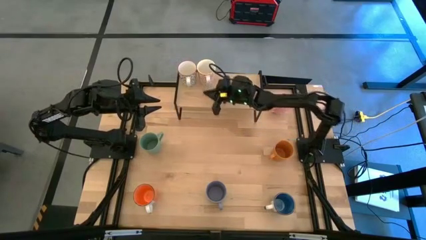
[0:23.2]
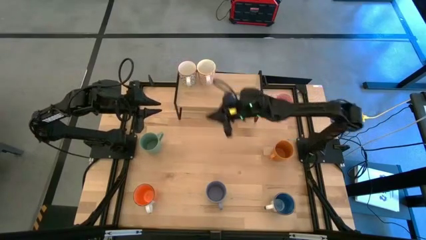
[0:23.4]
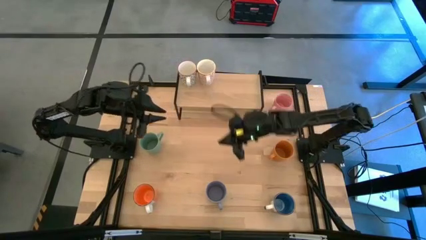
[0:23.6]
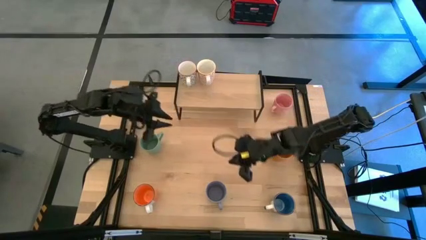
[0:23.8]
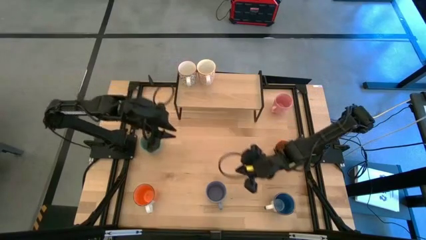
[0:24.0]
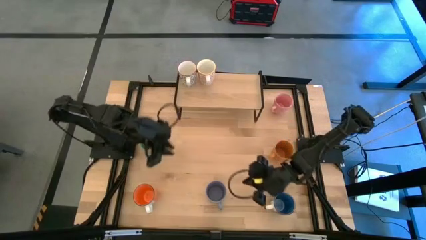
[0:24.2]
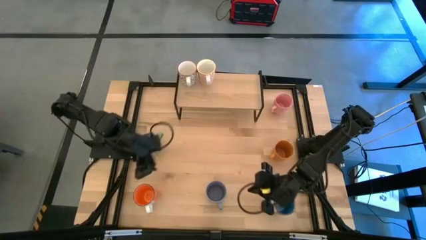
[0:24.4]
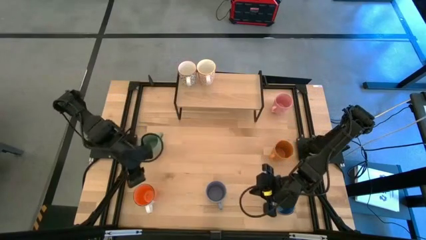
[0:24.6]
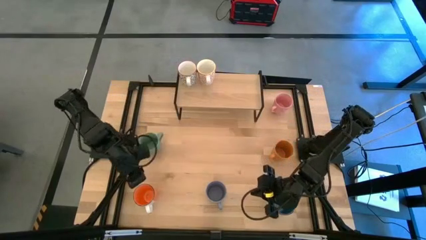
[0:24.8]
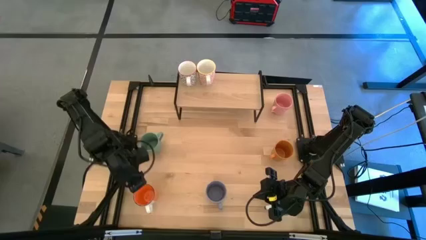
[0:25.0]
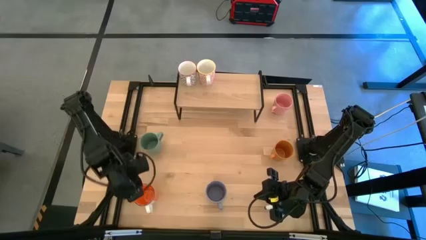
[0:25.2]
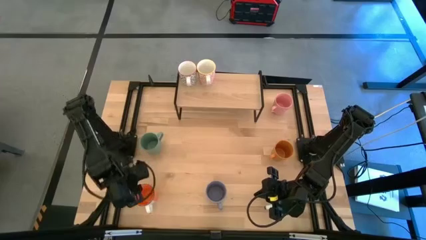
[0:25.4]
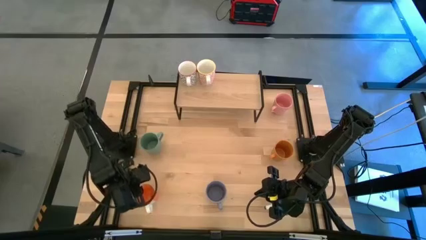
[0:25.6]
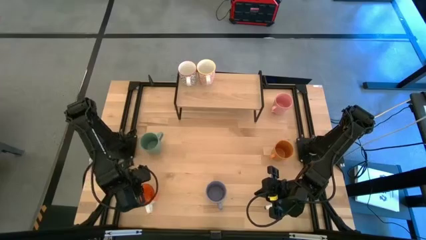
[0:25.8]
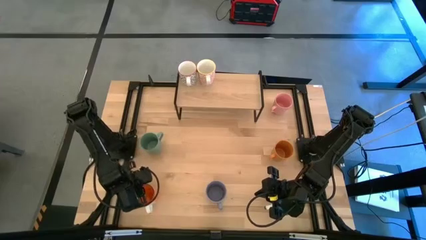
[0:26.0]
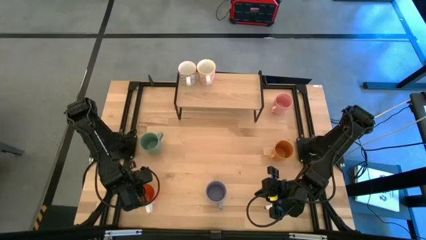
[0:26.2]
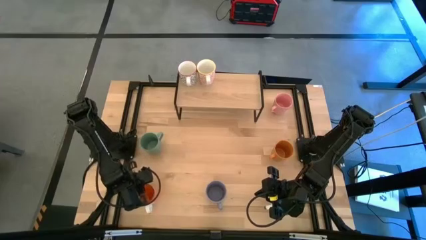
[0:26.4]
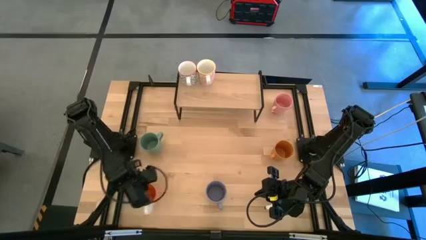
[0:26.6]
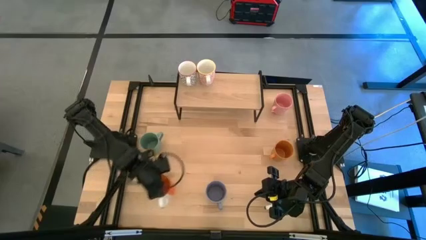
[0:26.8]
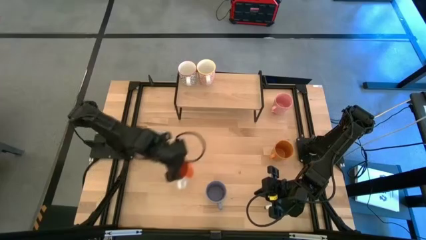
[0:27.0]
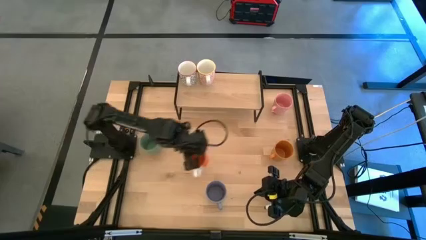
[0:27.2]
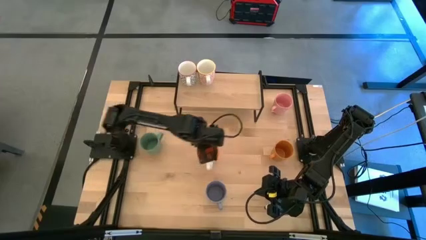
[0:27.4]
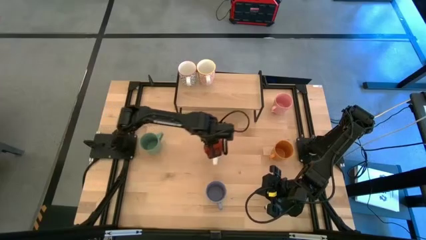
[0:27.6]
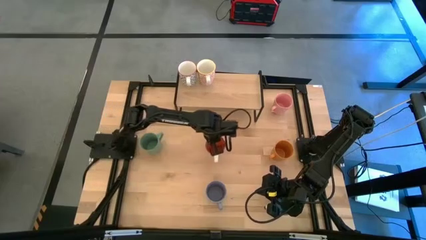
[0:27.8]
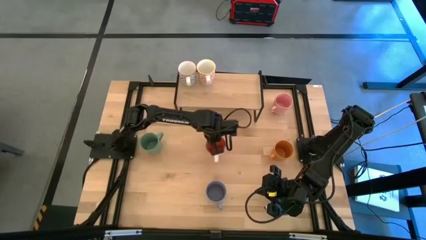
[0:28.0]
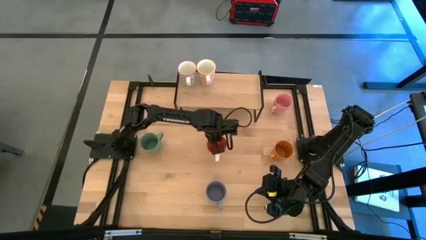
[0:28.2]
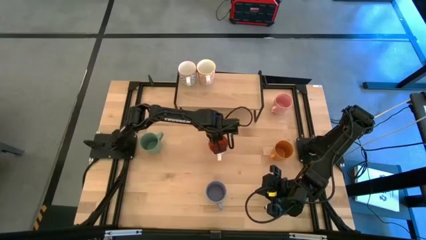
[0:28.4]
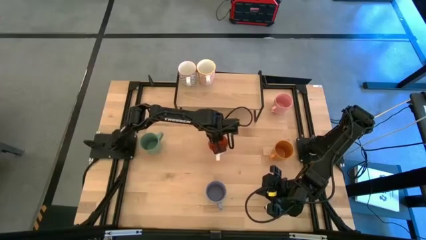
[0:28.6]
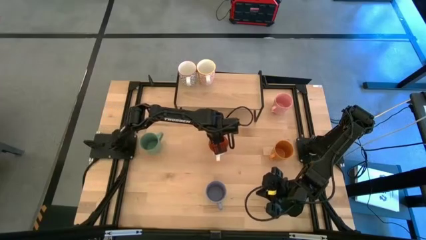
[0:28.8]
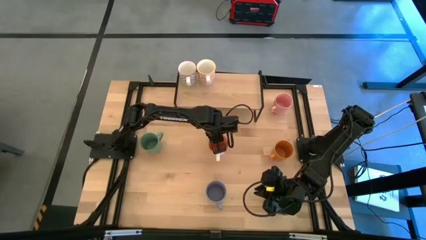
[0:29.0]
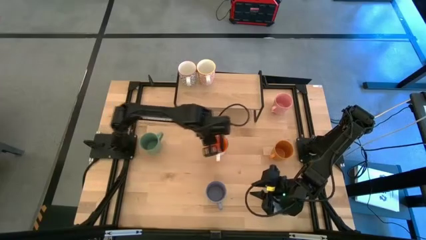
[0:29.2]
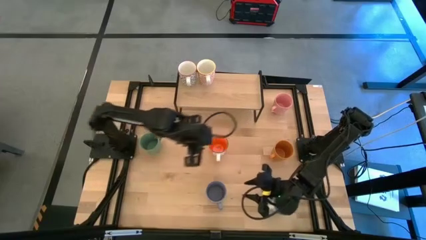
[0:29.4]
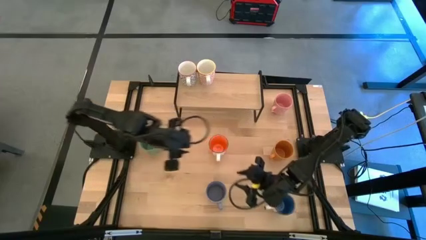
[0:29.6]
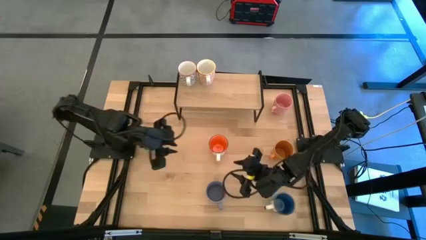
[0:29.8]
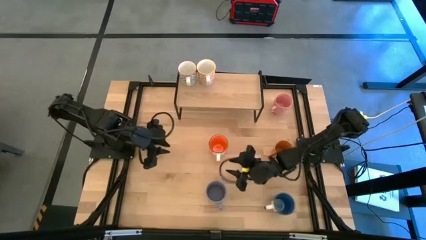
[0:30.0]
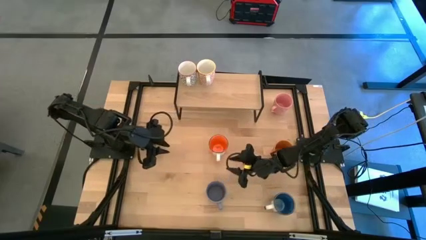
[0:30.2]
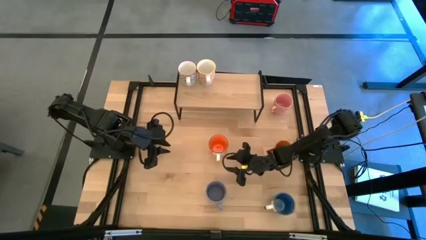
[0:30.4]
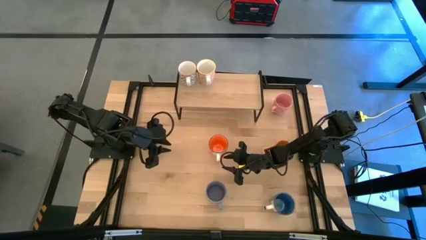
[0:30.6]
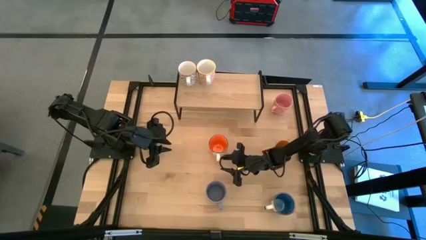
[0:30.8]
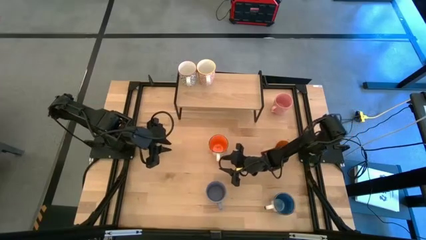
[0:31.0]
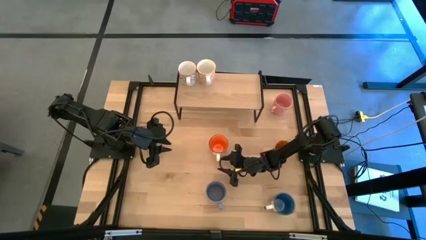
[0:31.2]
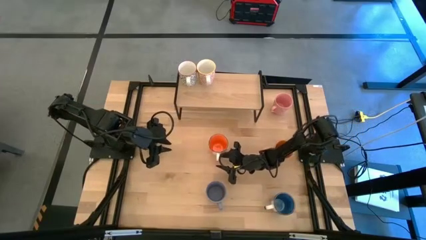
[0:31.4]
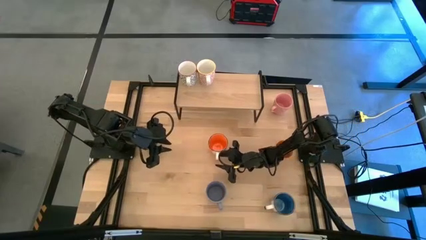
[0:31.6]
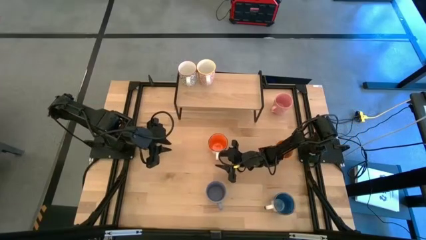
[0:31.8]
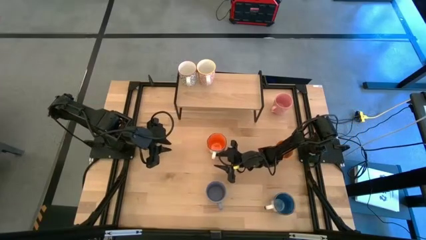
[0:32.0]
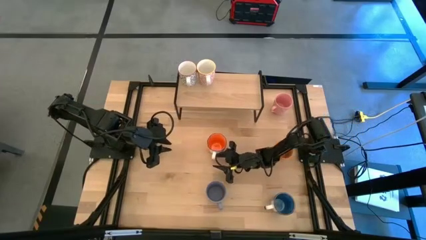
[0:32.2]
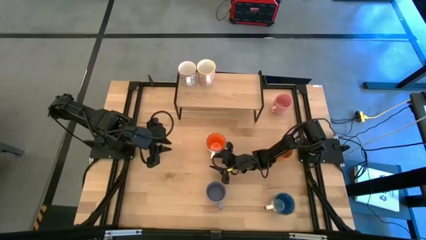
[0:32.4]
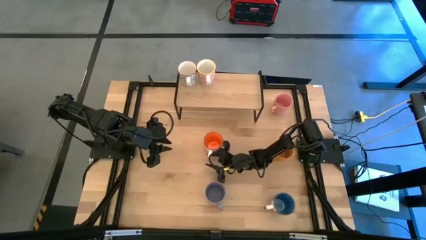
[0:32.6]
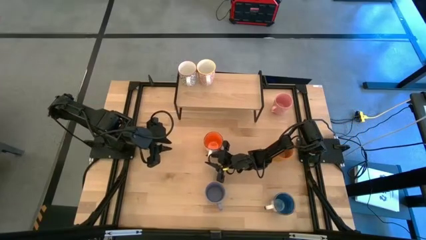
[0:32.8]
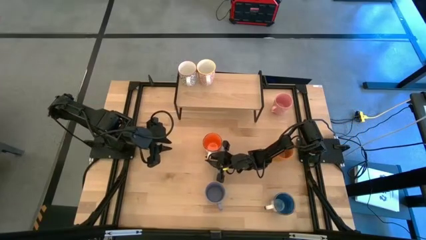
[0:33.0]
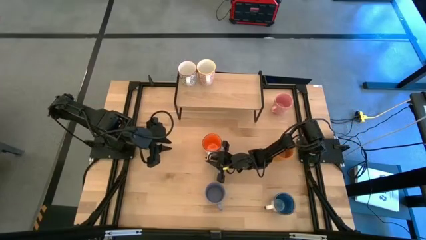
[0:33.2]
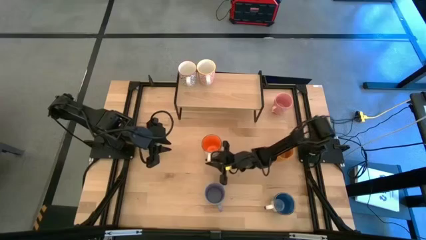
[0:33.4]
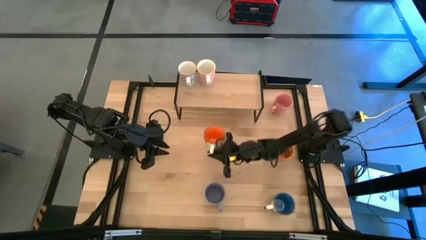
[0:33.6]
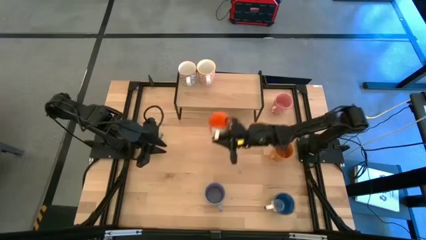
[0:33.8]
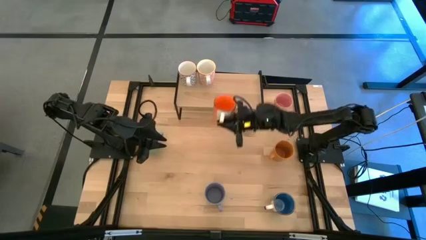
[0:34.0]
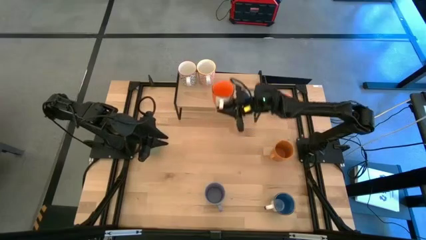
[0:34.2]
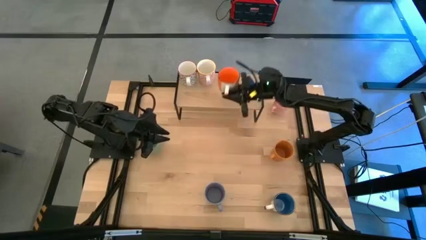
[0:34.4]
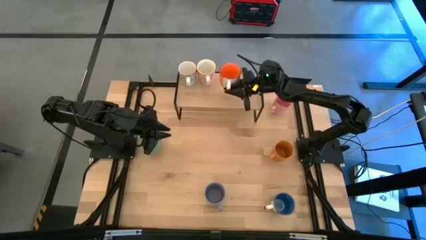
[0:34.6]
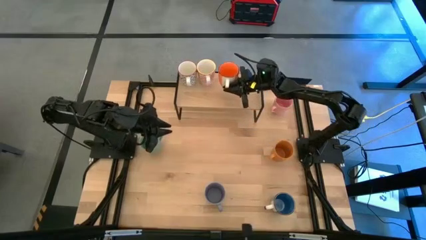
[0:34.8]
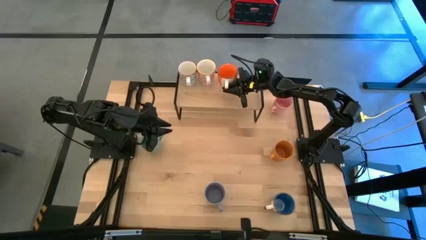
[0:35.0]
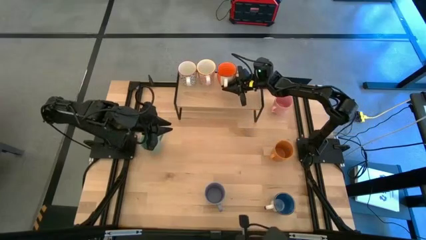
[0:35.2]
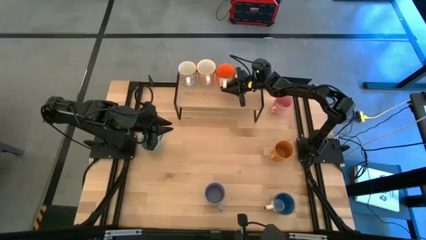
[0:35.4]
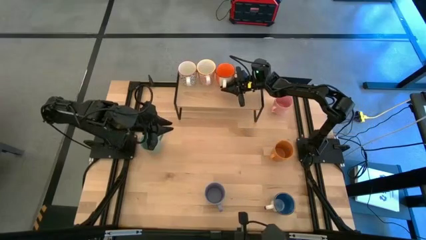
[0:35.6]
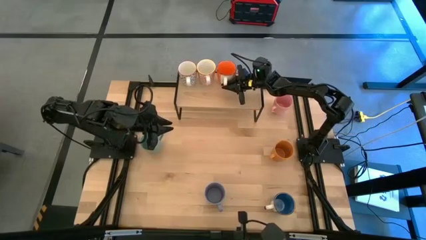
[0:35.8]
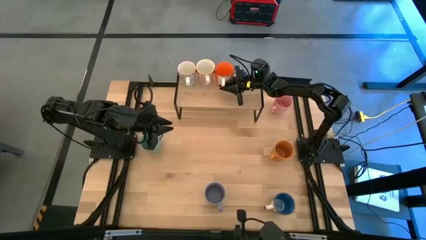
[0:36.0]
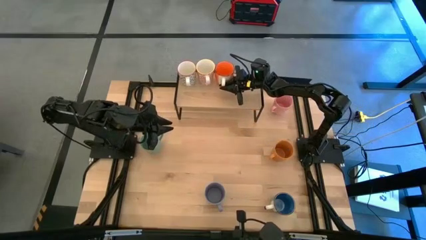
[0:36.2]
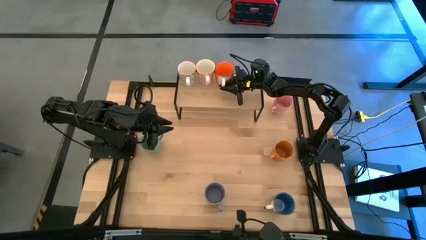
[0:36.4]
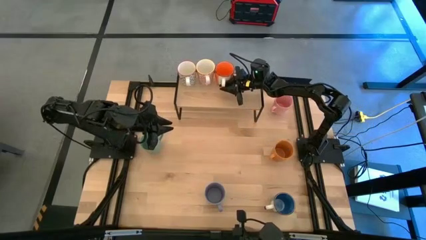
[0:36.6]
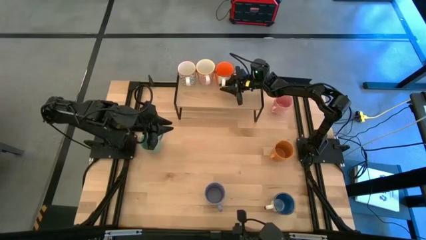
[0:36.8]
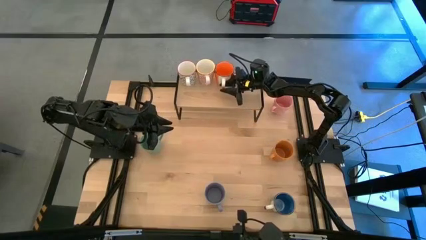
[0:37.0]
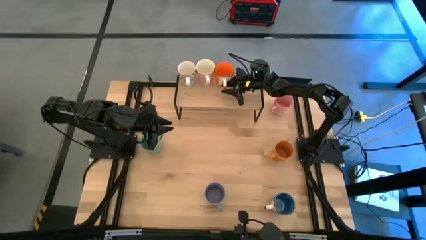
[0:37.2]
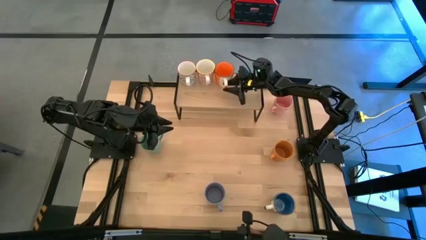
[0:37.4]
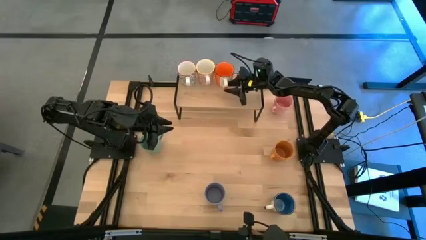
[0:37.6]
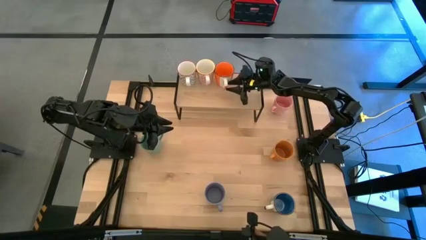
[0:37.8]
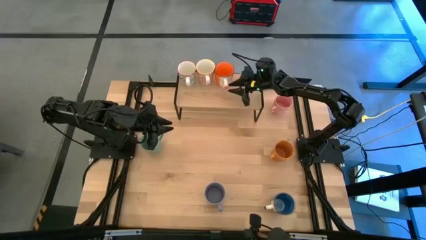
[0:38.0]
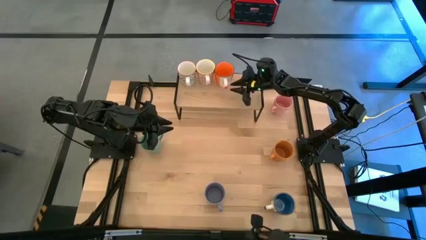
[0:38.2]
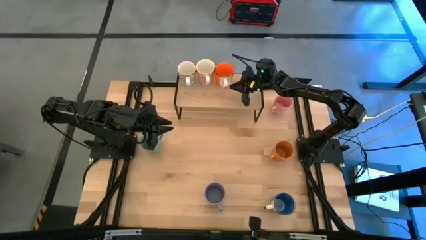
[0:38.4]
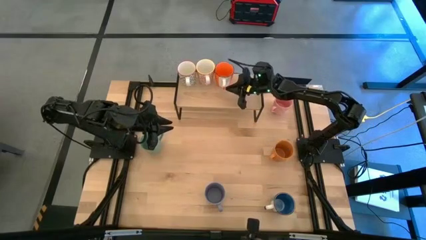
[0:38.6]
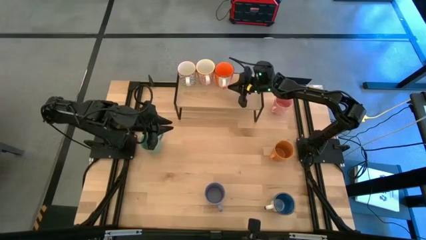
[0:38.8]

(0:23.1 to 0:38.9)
Task: Place coffee mugs
Put the orange mug on the shelf
